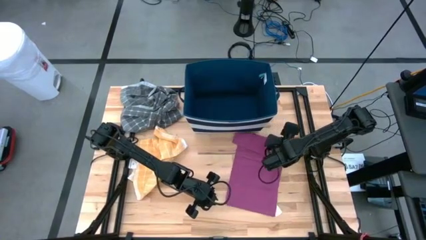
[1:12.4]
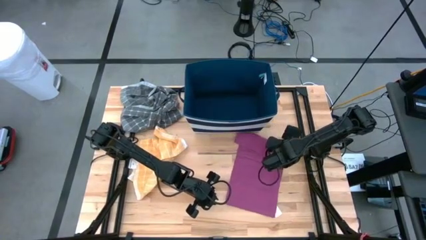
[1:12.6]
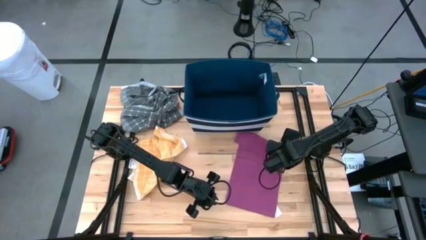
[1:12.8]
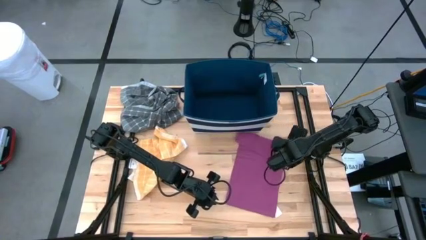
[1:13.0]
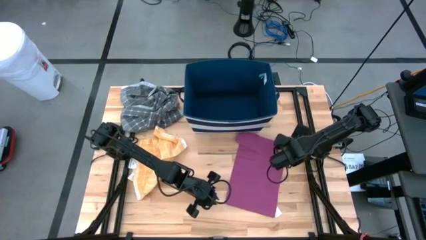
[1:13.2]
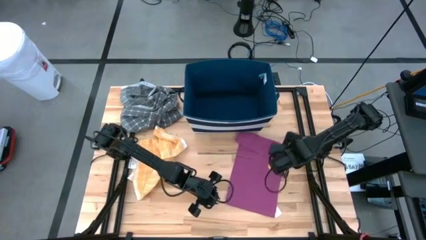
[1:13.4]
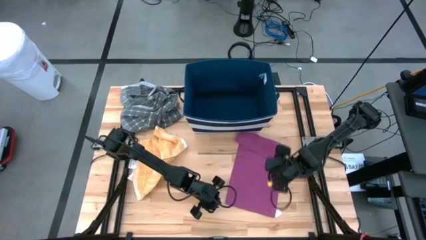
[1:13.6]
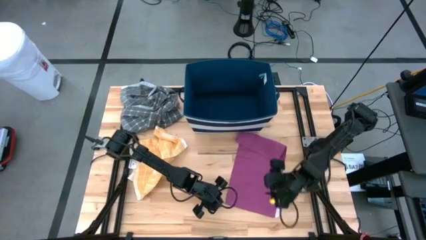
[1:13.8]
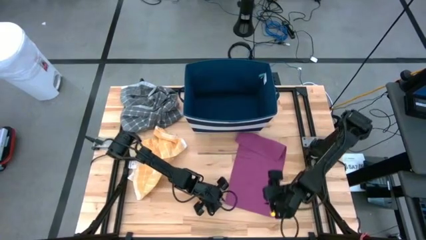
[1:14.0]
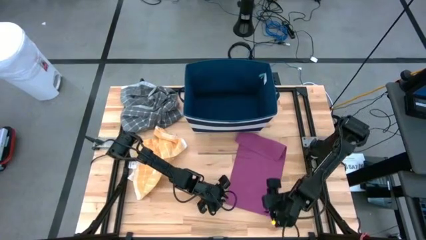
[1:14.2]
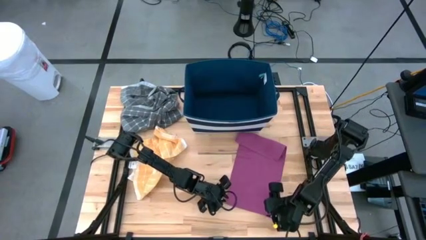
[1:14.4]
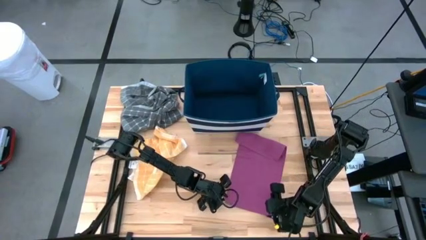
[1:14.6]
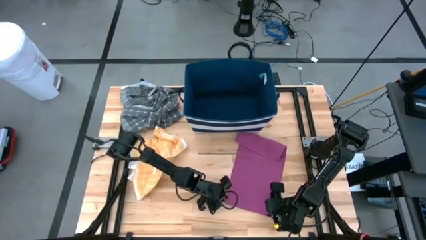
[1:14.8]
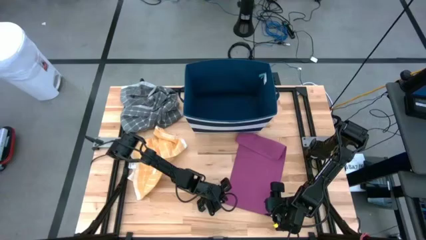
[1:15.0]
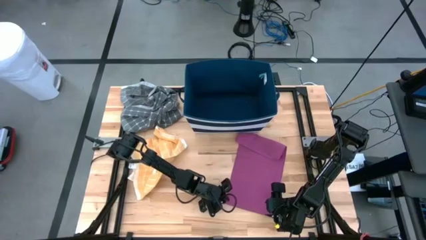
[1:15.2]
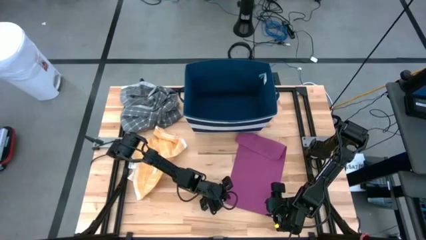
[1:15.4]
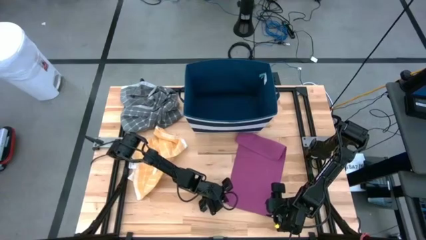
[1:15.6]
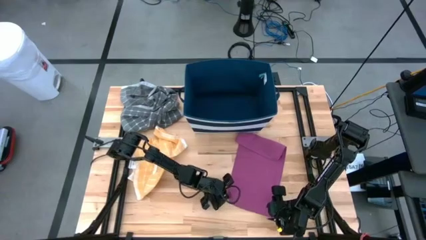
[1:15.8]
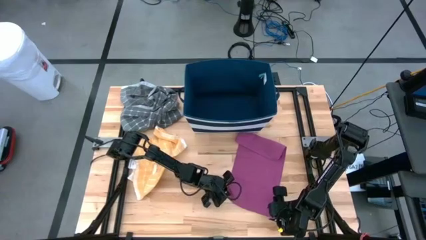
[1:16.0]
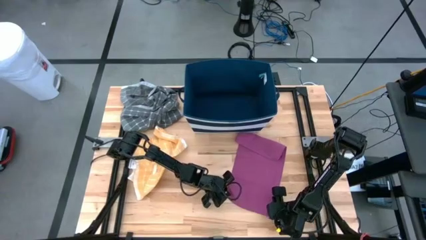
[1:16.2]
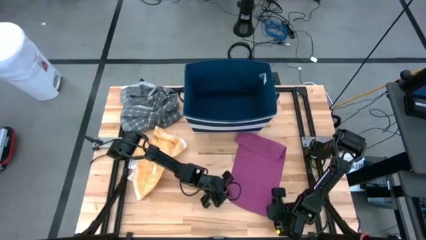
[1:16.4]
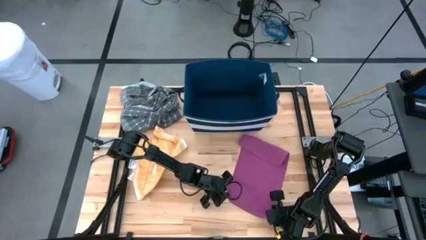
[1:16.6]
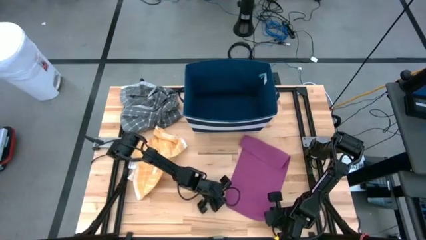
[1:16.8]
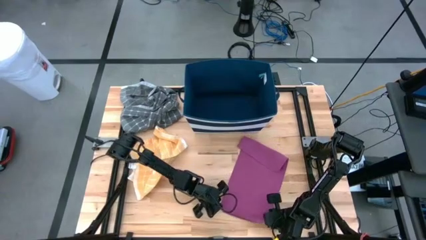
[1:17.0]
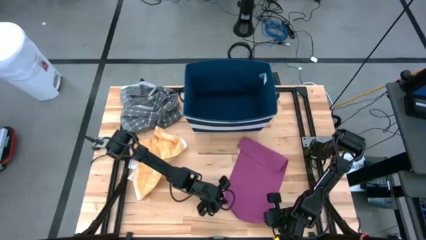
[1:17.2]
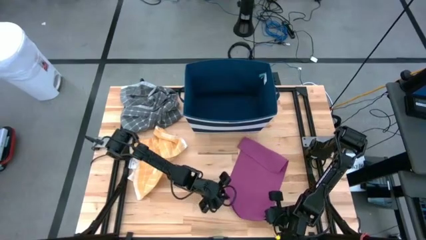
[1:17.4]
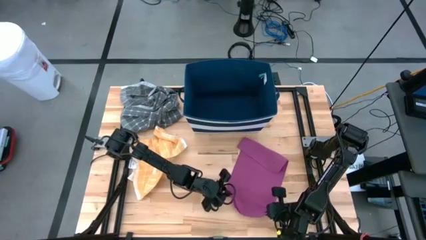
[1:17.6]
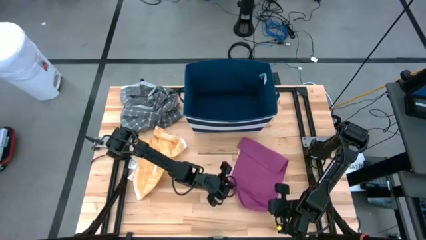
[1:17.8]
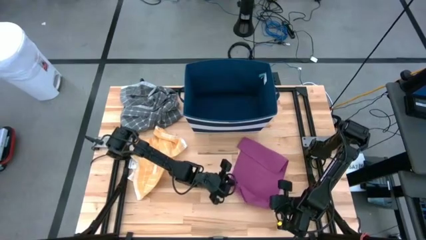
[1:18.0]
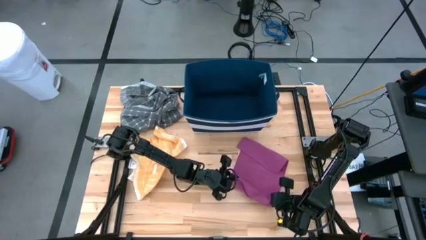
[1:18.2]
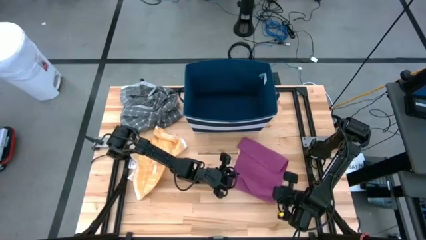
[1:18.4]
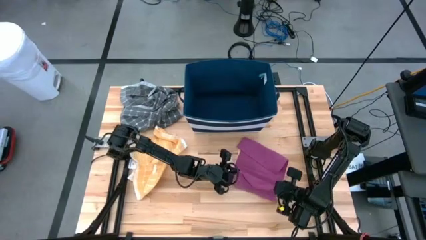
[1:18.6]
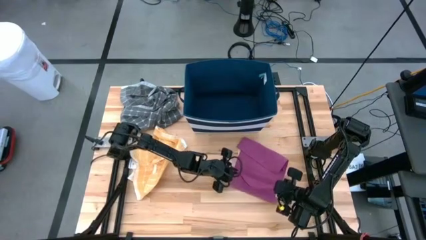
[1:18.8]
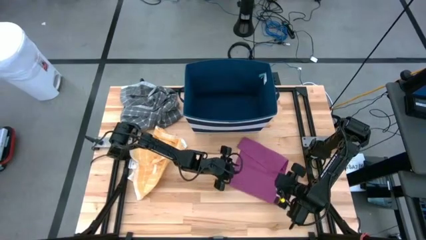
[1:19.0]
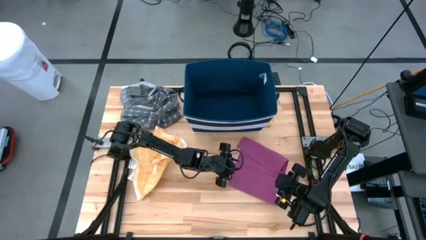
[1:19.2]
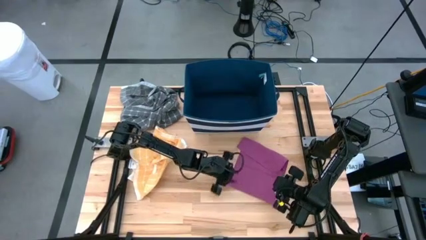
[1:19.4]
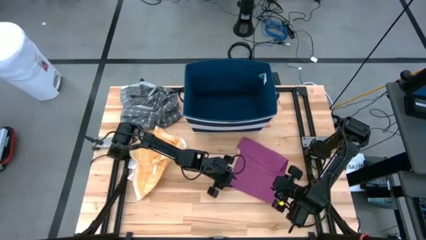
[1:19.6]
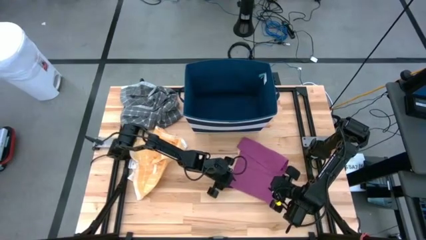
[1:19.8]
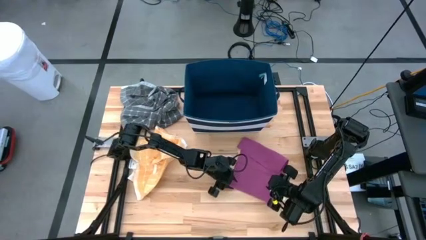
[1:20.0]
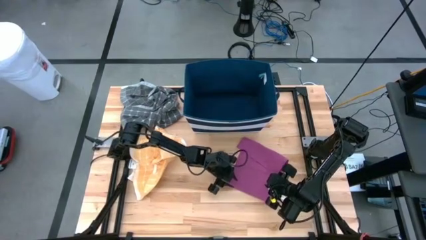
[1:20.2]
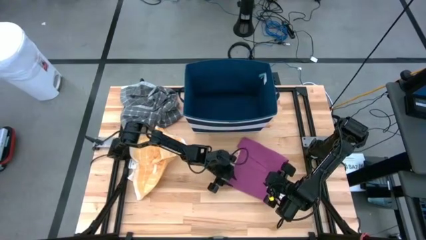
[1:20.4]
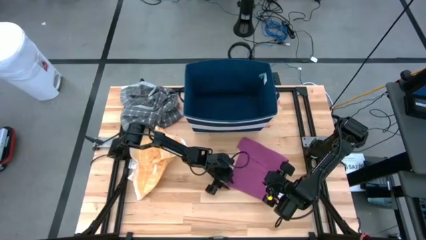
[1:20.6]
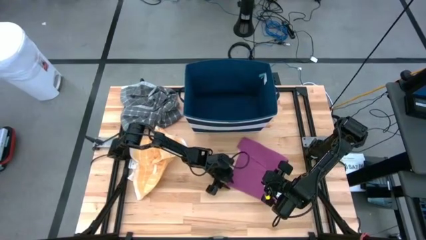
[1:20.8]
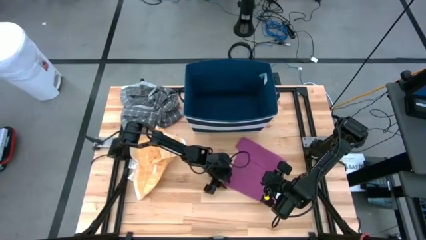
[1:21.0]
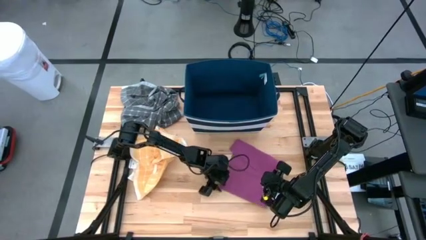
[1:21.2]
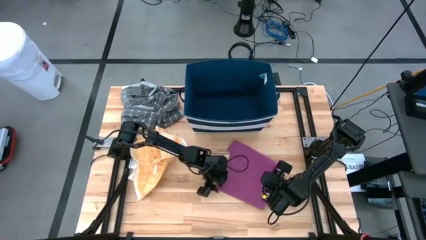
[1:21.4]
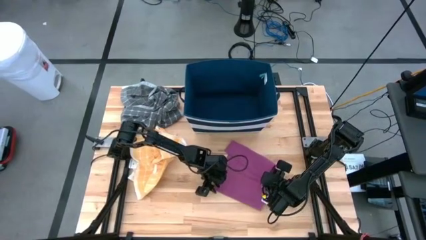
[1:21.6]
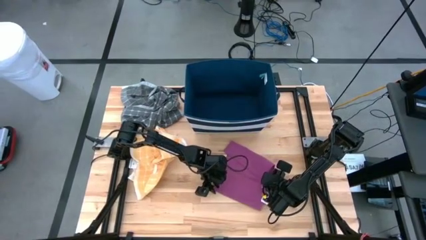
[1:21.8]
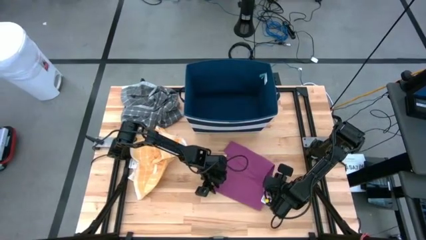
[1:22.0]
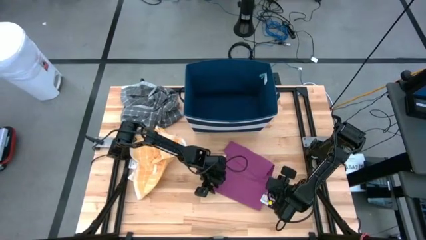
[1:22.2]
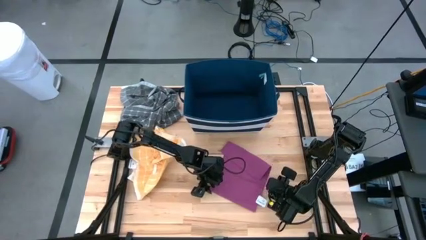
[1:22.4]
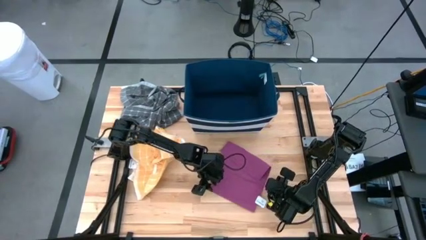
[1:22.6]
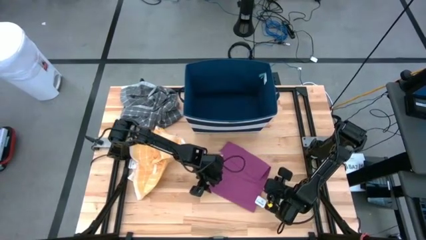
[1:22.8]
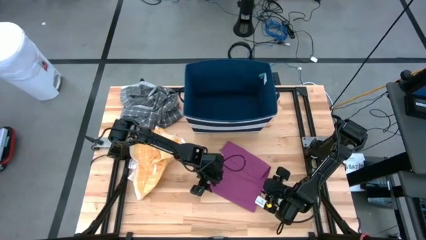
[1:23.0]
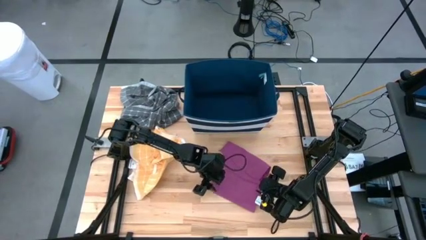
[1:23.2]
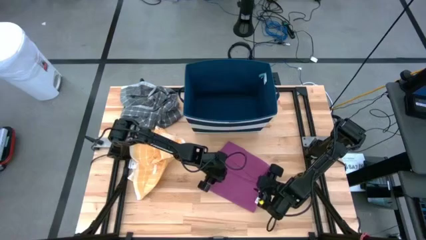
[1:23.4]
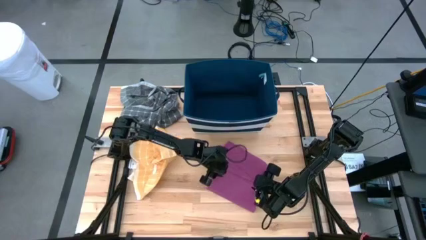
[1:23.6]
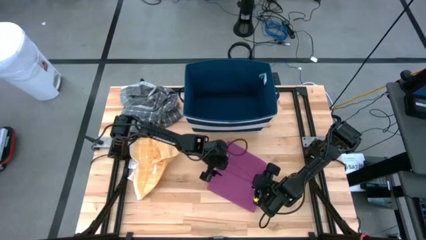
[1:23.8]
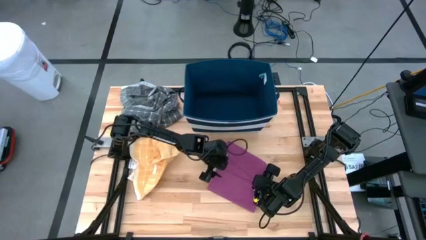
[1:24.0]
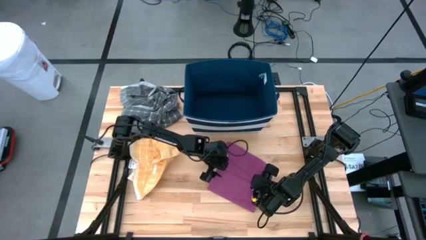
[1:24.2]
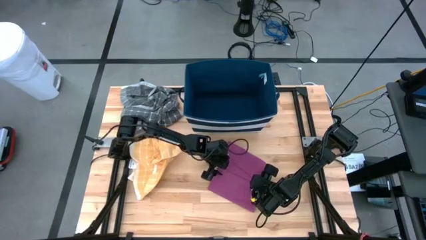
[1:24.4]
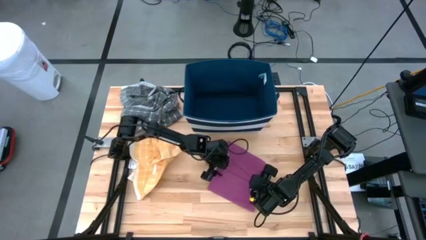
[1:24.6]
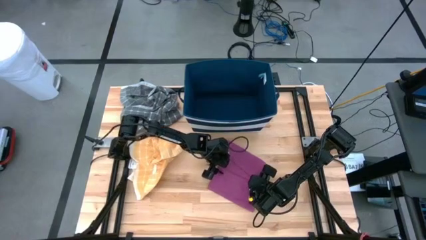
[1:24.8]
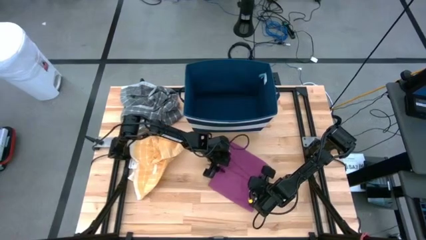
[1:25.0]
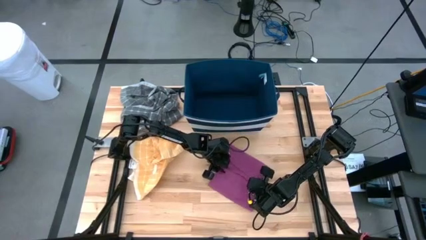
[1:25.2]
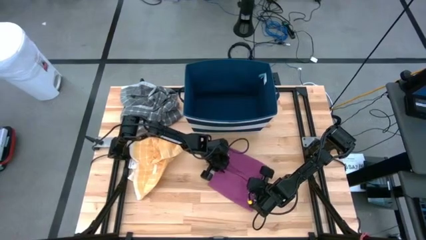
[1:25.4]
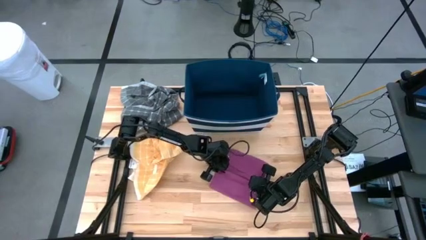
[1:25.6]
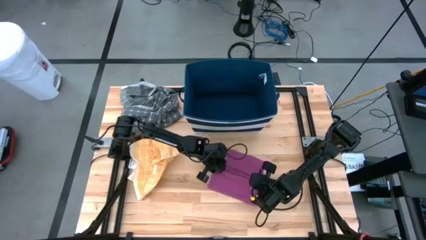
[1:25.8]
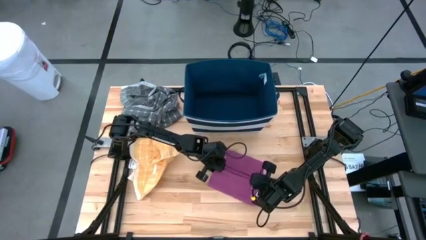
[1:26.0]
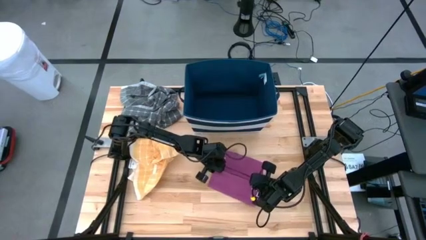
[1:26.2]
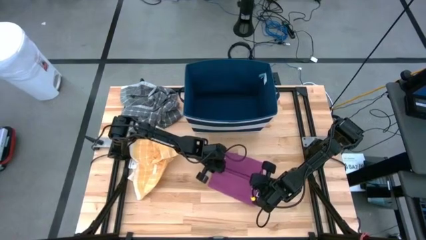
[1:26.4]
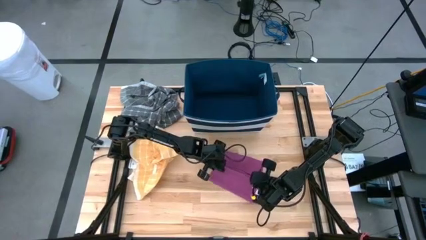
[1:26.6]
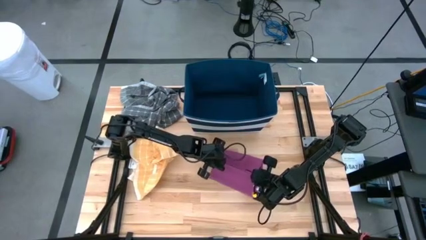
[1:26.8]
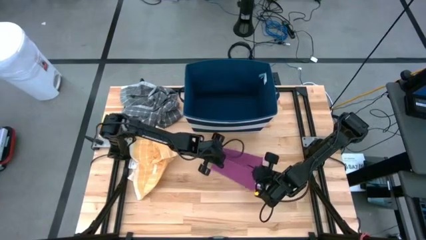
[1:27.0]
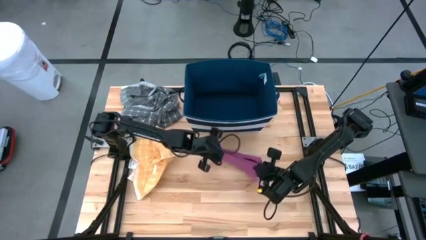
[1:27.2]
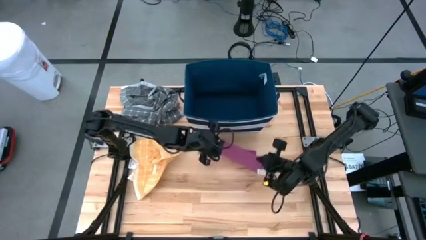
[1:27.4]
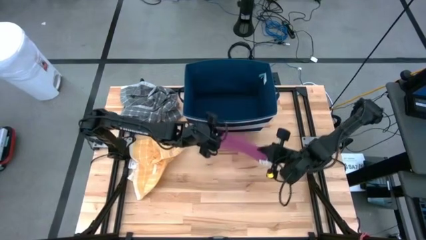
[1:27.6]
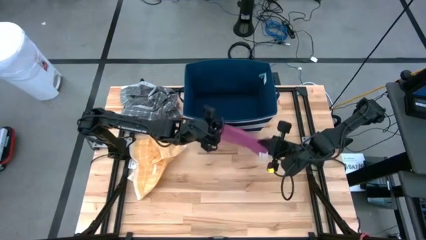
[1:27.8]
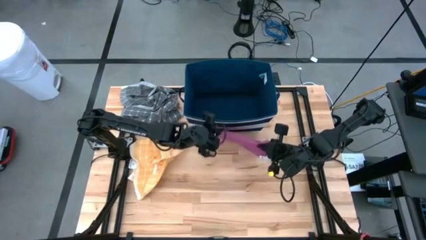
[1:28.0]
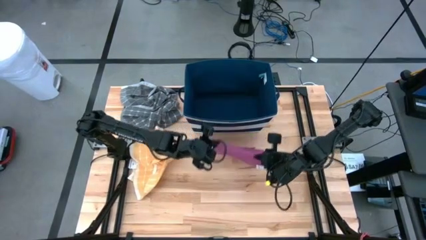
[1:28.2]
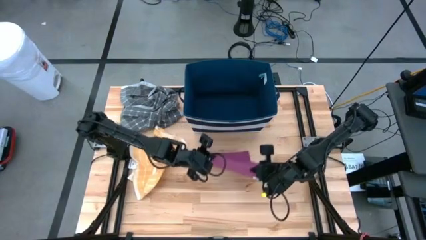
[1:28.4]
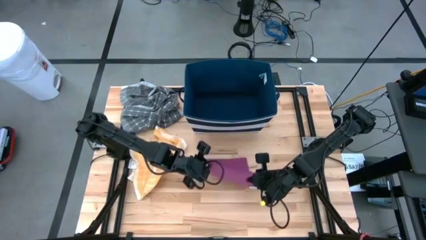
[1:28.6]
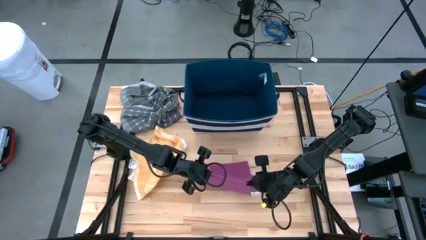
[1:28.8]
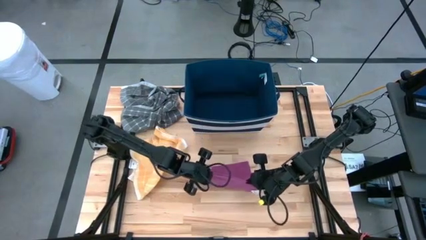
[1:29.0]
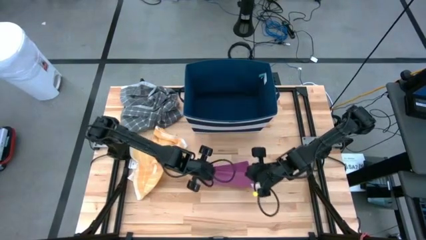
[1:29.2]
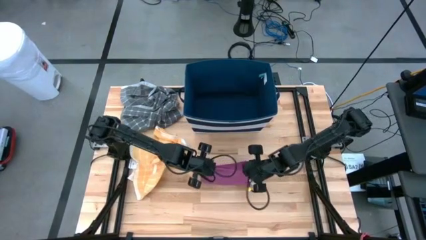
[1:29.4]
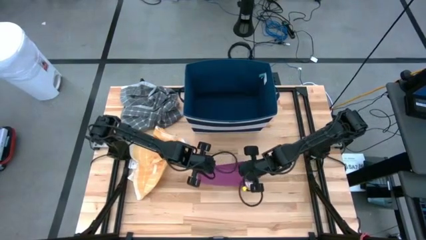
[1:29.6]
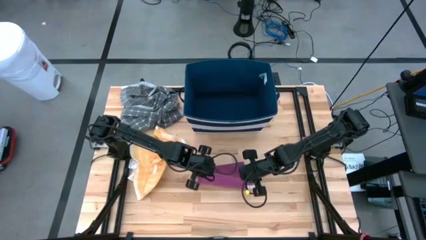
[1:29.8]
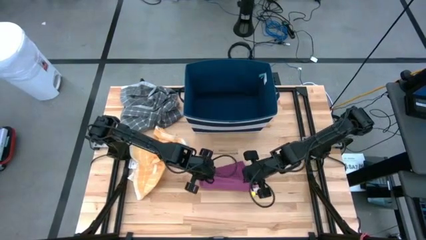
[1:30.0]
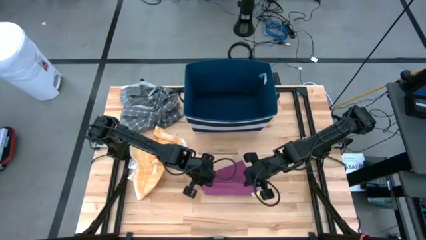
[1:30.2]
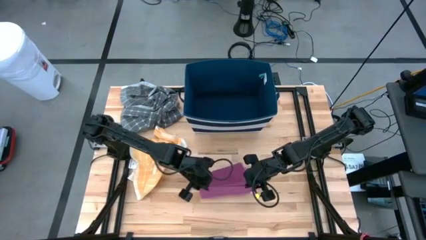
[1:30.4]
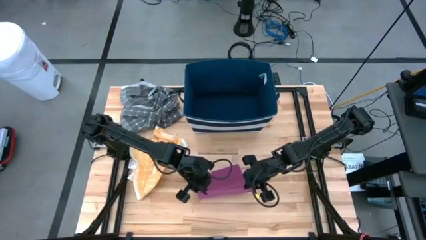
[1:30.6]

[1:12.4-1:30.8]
Task: Fold towel
Fold the purple towel
